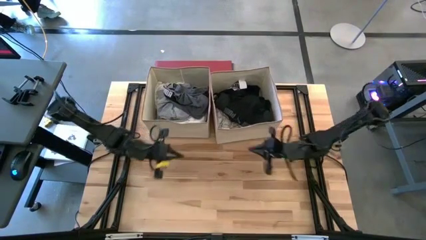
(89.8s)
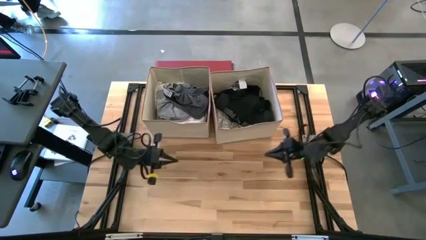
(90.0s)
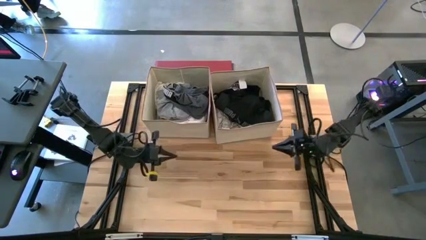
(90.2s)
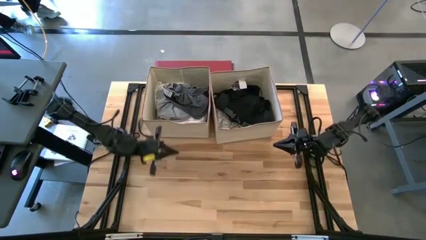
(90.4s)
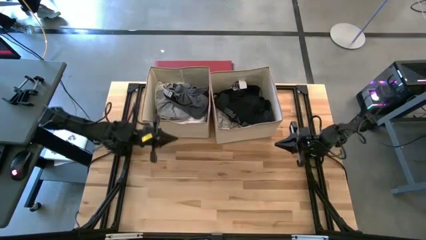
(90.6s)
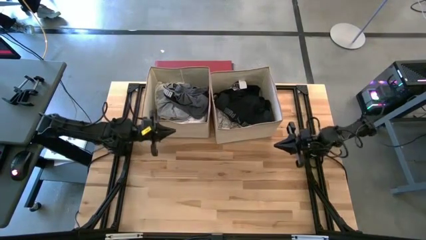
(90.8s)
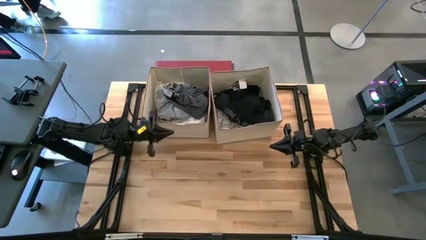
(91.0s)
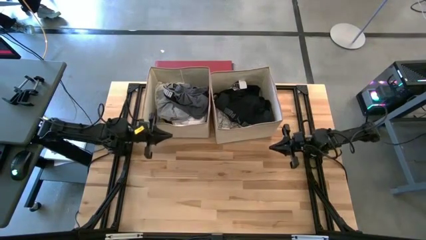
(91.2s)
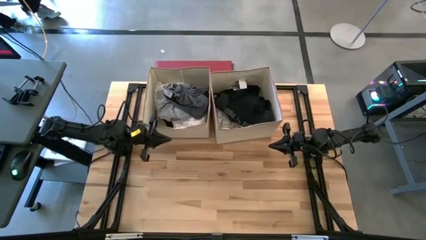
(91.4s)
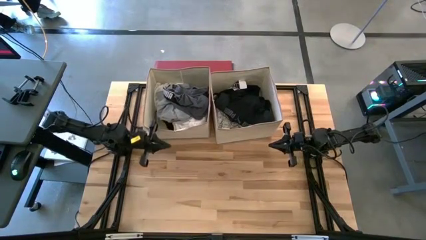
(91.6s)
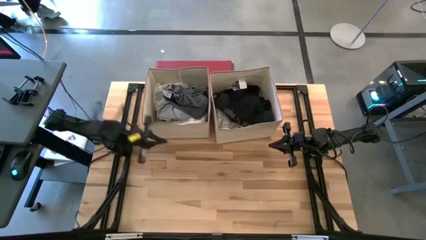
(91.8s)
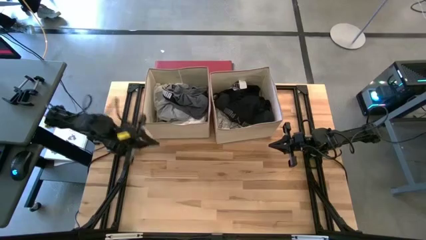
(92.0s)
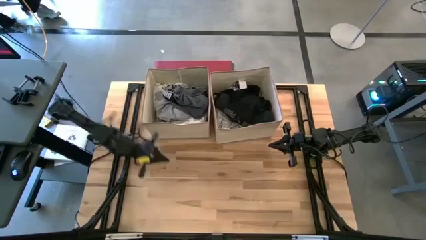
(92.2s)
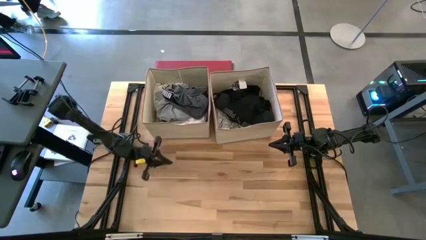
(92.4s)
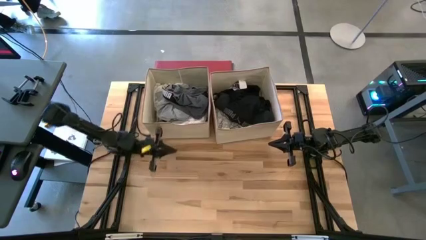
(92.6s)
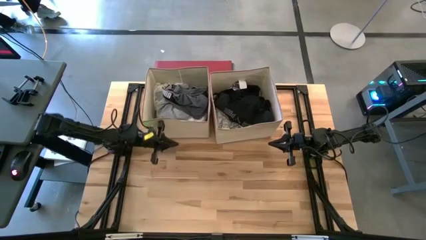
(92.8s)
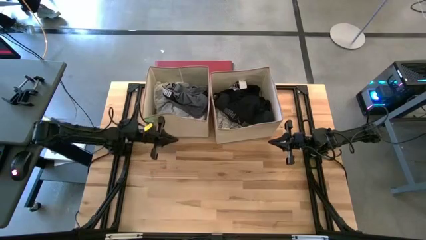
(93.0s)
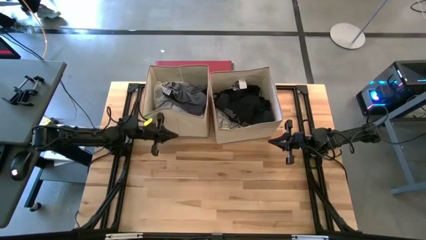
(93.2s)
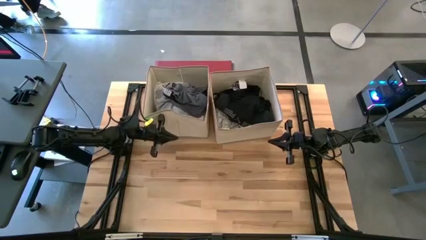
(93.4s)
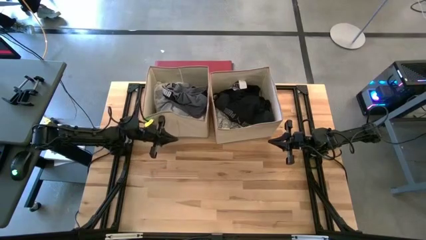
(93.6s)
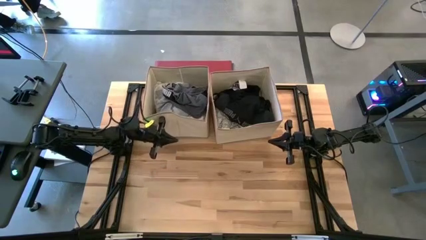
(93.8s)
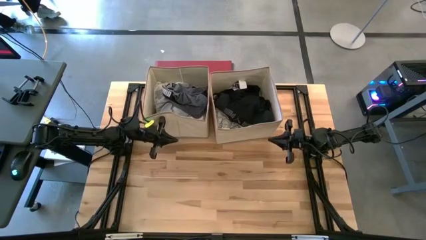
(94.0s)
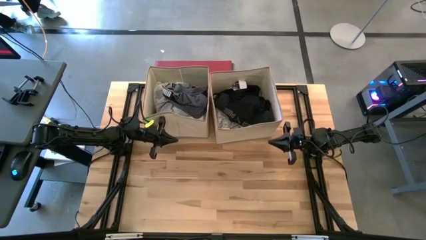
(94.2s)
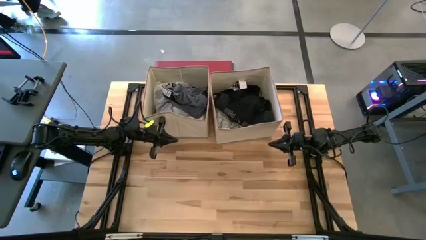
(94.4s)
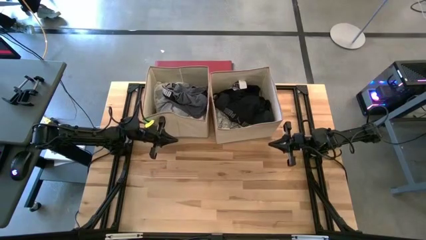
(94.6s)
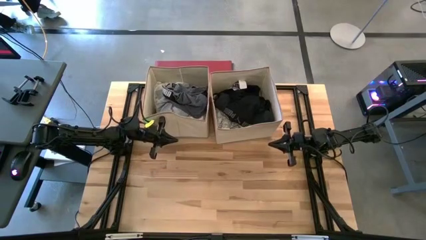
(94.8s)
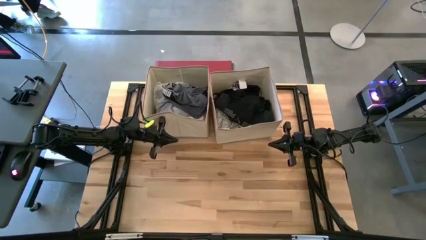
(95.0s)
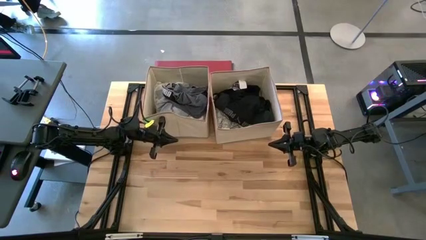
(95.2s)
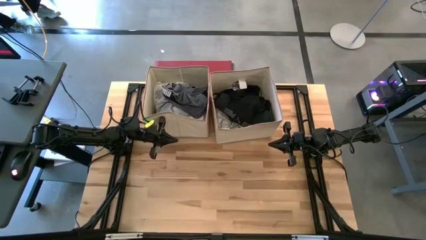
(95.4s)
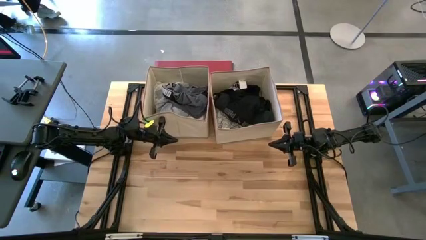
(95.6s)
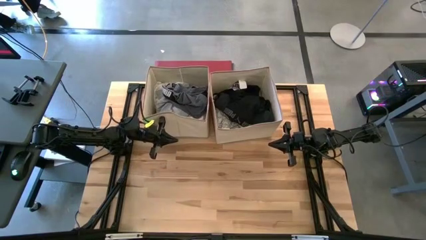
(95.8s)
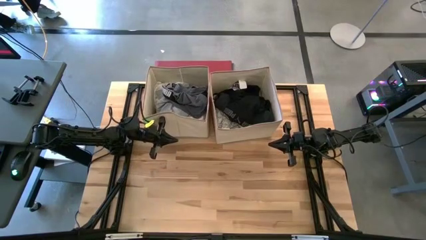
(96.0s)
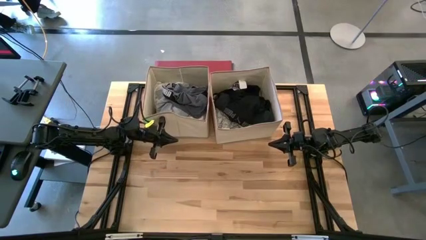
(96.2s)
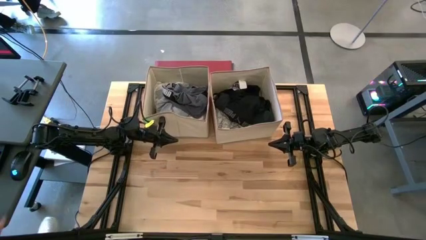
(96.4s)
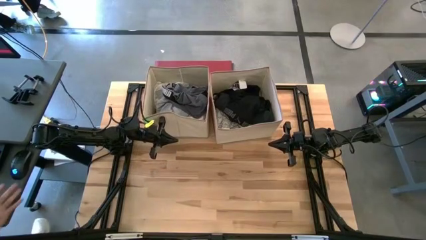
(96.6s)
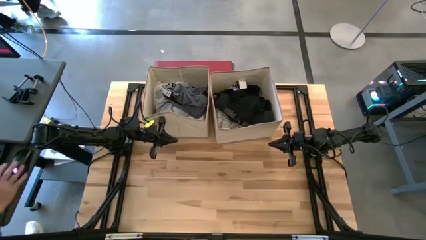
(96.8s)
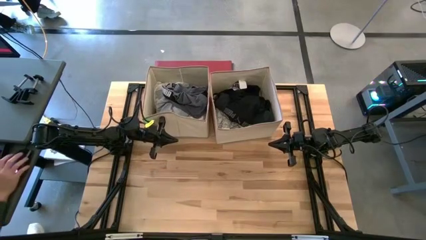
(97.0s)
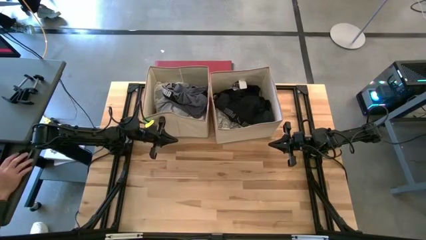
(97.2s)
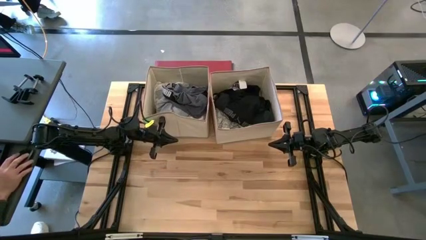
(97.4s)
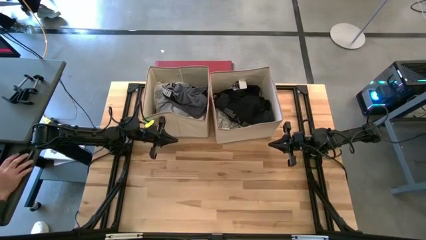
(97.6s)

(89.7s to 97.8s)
Task: Sort clothes
Return to Home Position

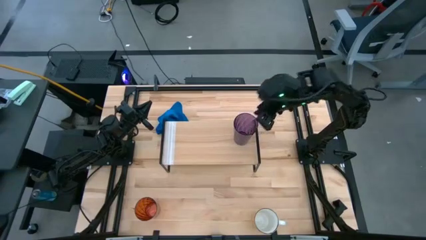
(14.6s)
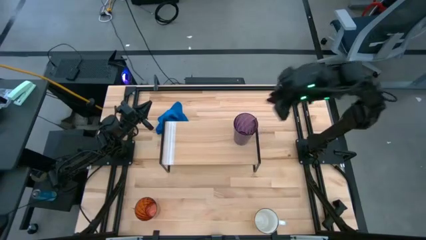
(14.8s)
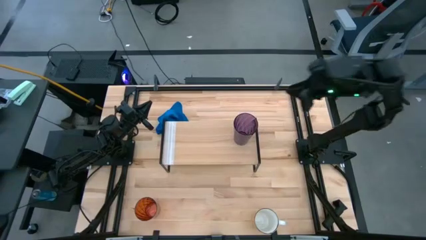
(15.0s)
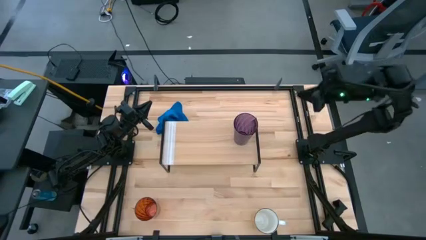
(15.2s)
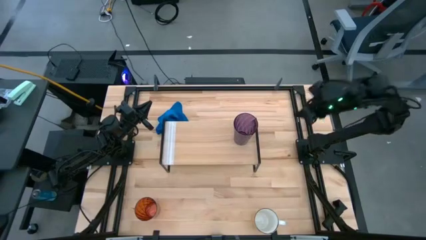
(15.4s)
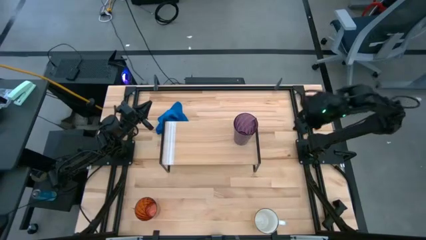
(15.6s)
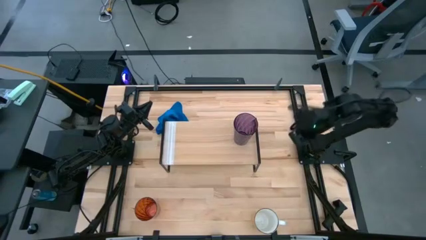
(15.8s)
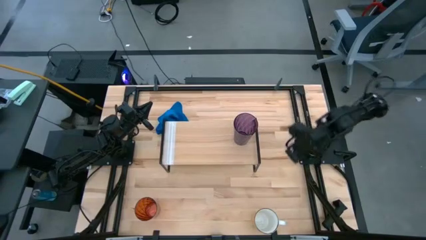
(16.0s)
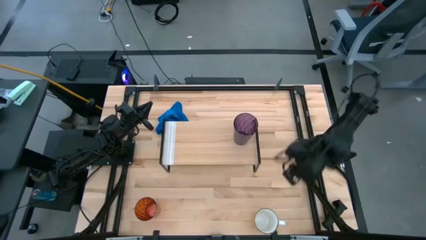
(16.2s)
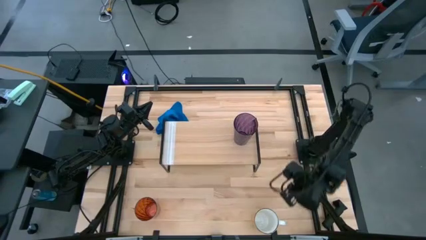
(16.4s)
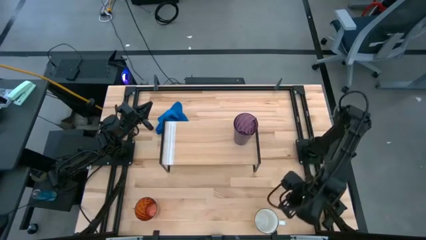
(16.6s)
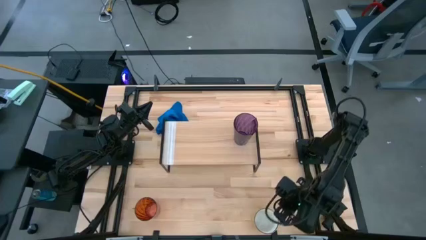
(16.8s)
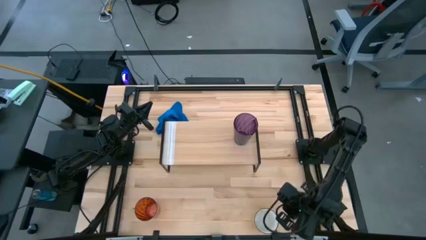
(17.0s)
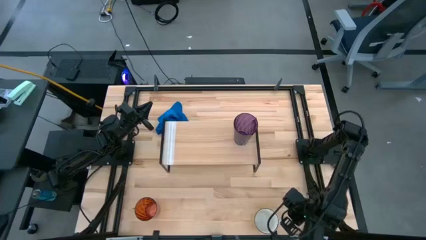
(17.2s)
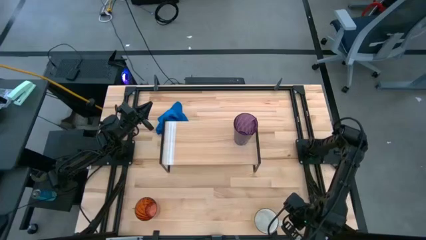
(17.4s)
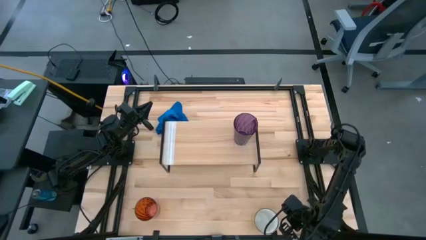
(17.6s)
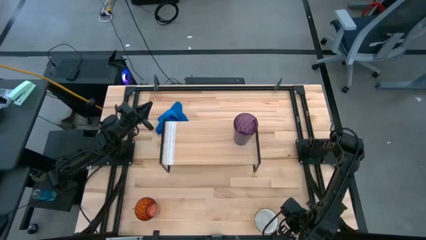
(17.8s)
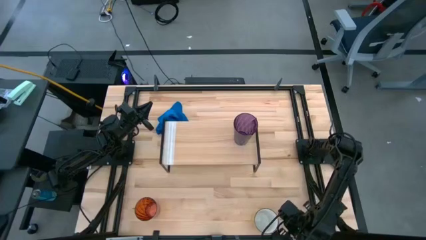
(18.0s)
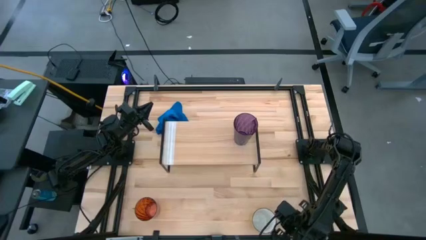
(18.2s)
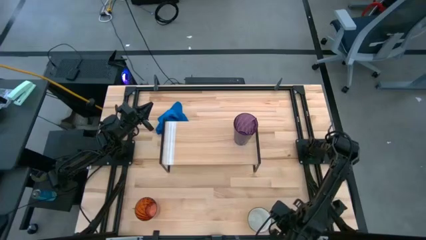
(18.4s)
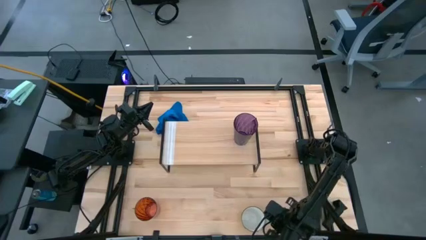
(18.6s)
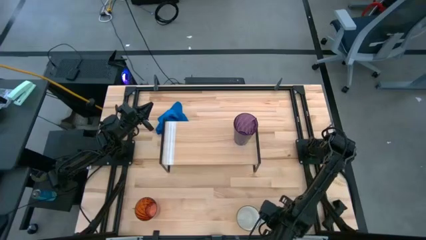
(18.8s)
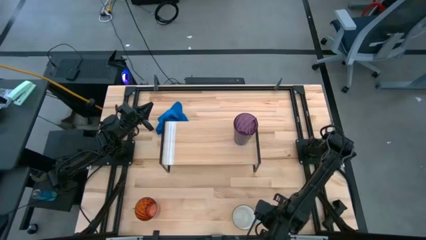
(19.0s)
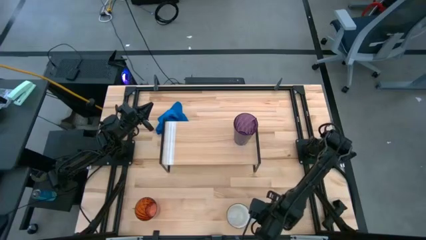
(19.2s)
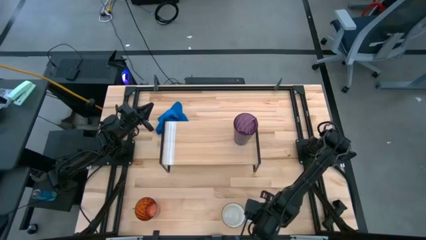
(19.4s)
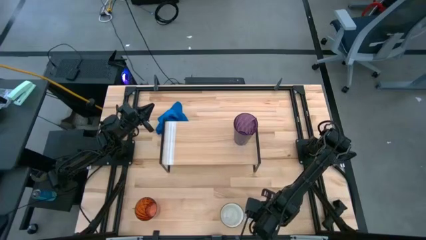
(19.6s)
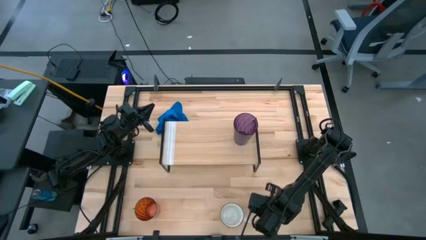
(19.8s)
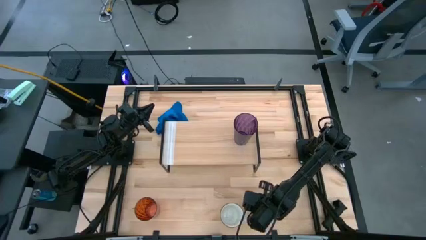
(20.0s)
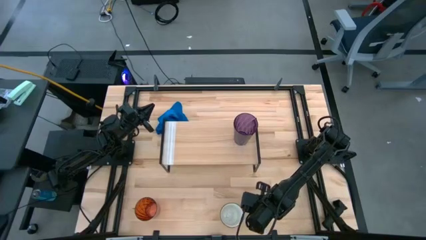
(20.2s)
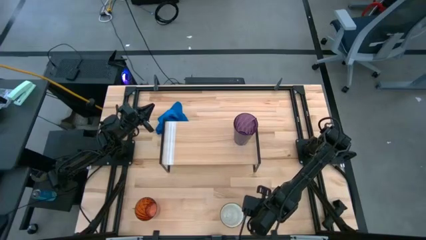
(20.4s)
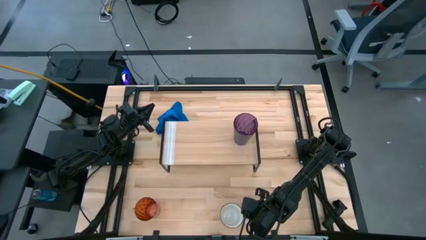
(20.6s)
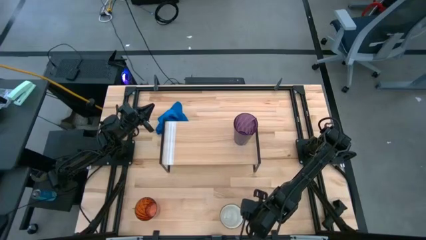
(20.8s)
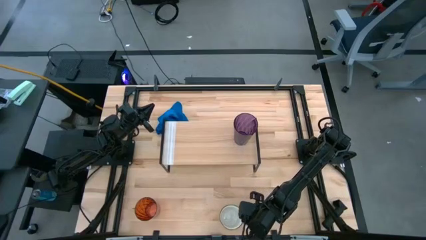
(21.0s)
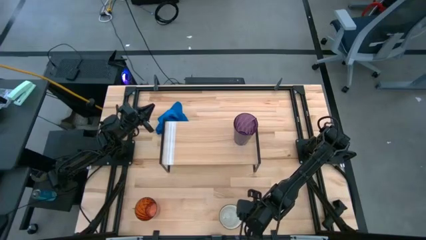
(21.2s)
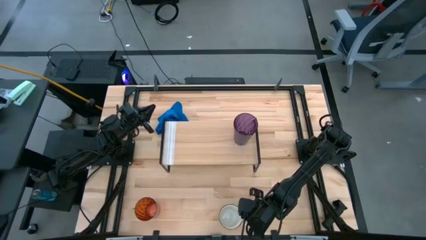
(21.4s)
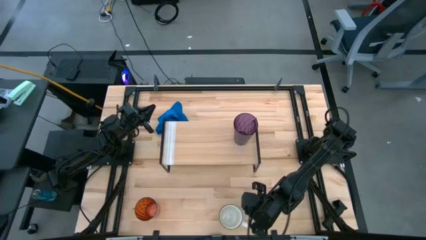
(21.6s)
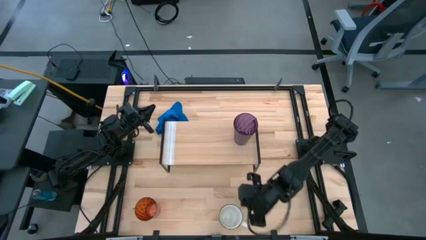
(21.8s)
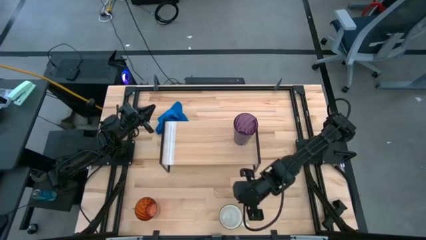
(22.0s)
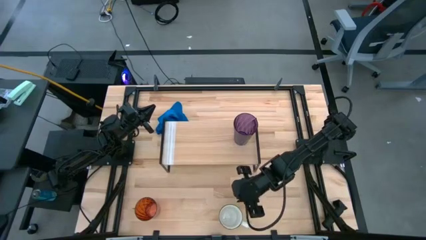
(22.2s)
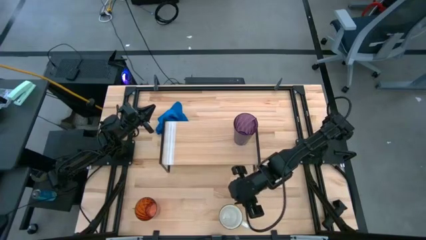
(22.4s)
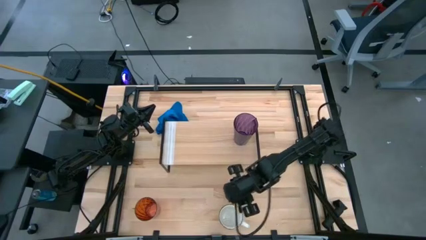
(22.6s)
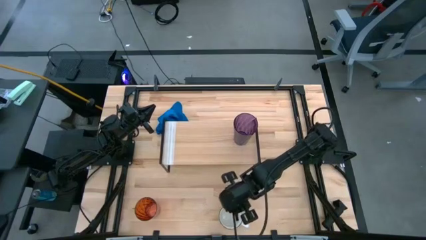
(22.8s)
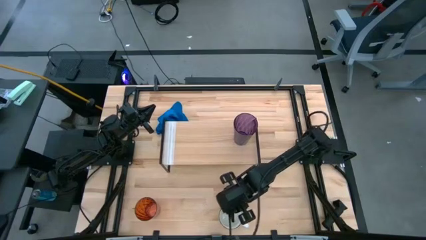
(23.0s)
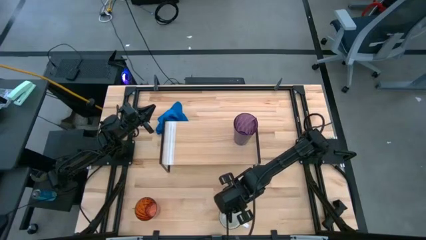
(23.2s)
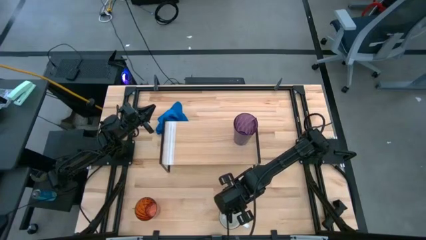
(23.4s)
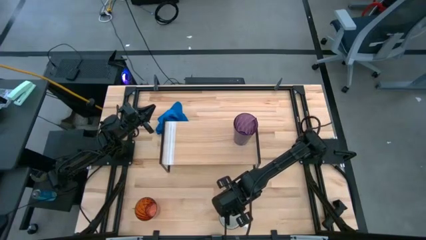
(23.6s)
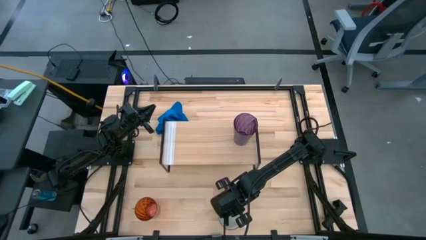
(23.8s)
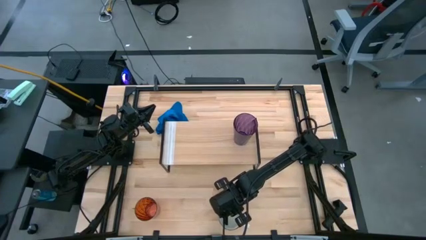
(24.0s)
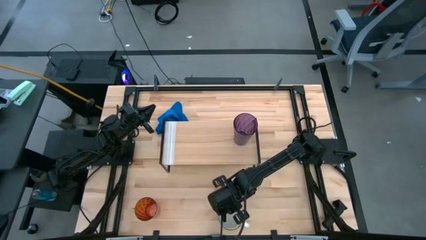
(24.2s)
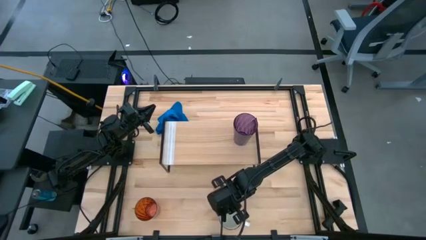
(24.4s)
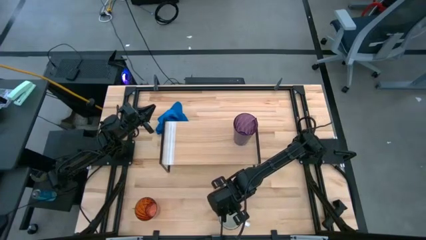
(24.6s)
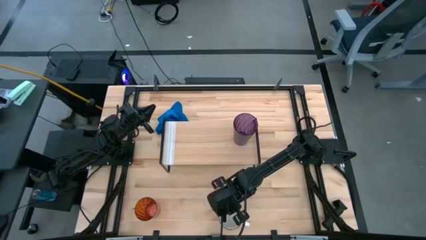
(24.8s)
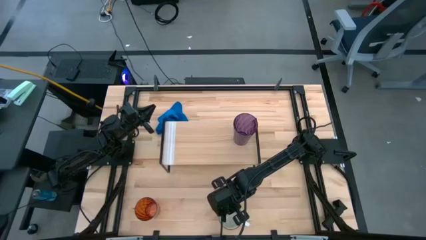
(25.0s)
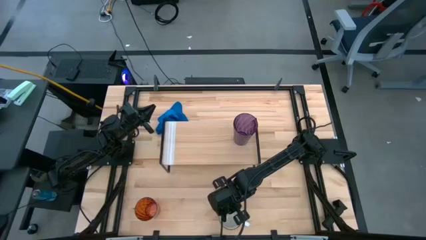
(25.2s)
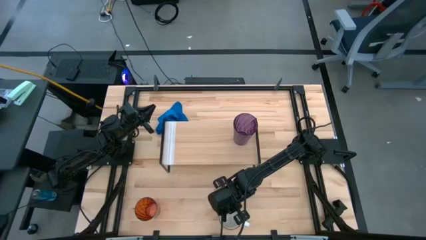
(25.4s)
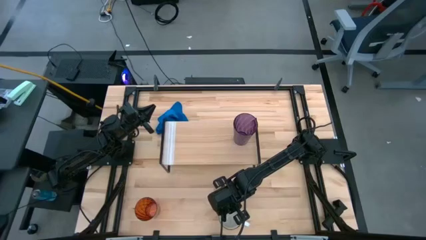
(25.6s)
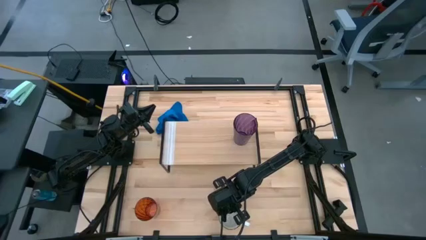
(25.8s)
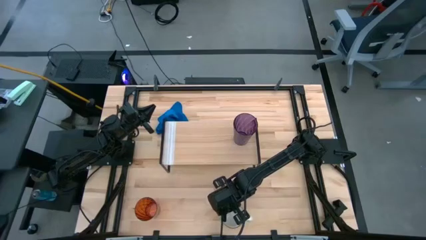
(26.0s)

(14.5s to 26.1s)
Task: Stack small to large cups/mugs on shelf
Put the yellow cup on the shelf
